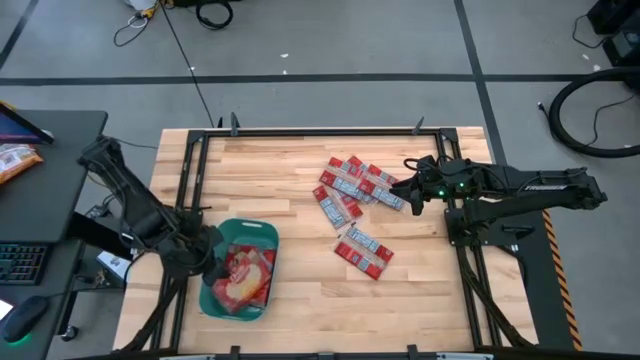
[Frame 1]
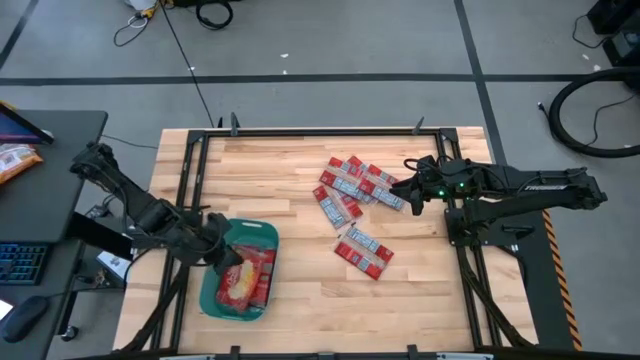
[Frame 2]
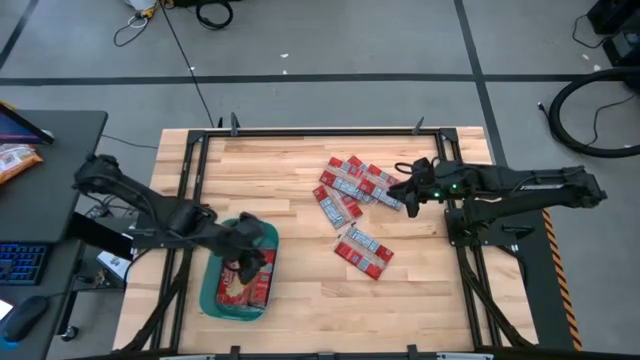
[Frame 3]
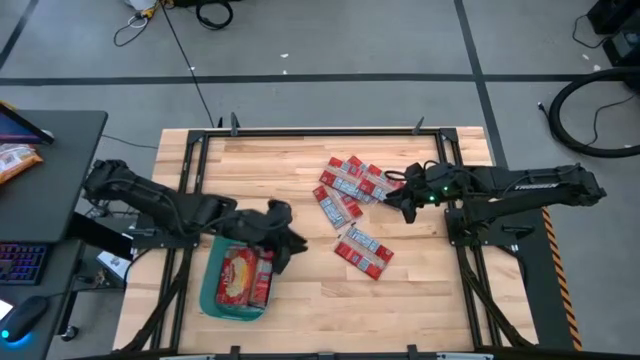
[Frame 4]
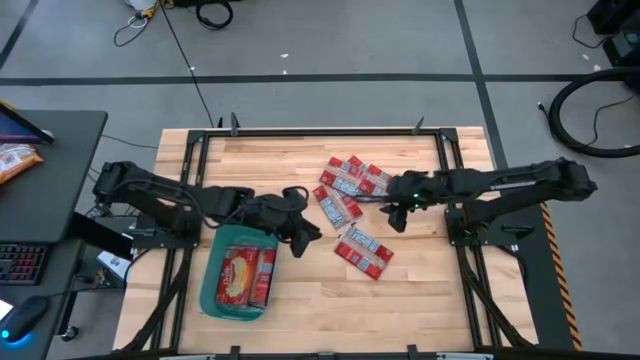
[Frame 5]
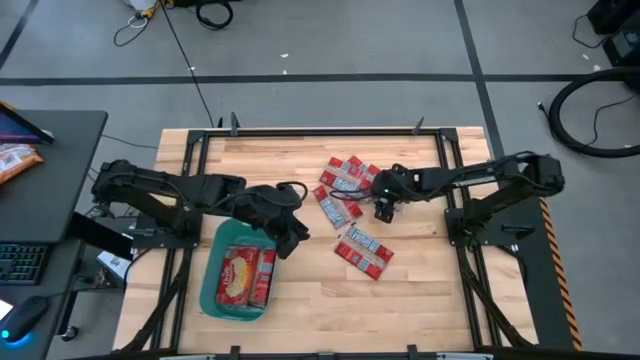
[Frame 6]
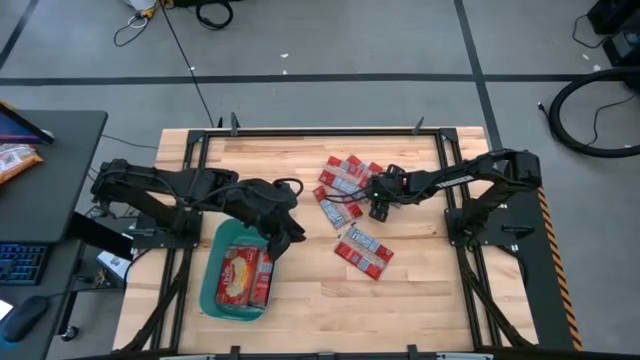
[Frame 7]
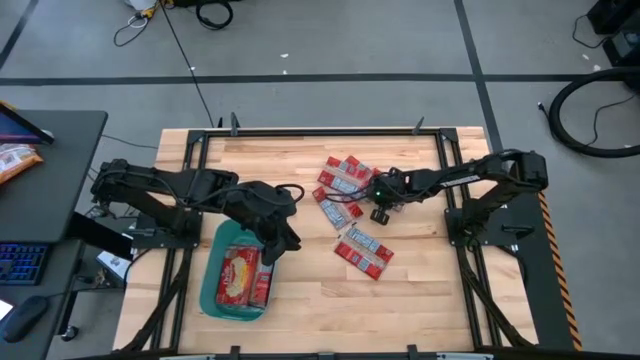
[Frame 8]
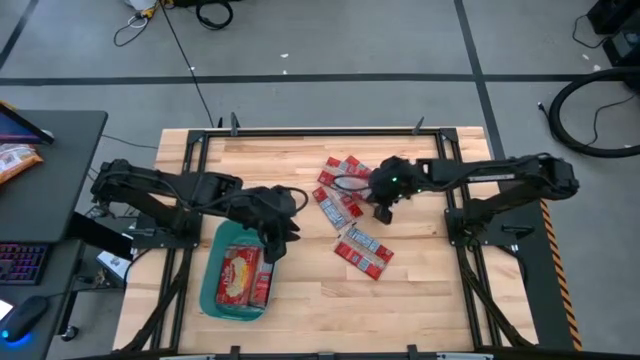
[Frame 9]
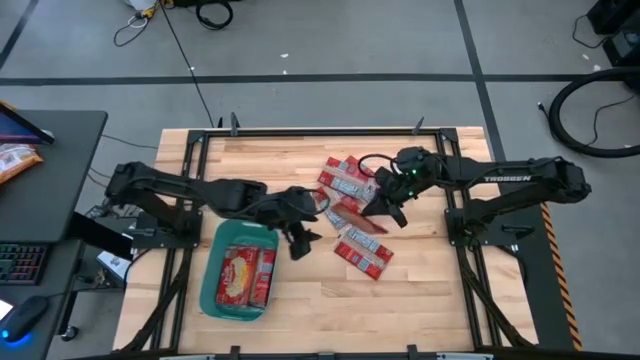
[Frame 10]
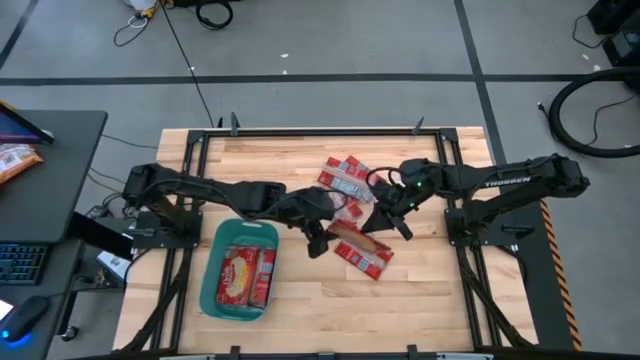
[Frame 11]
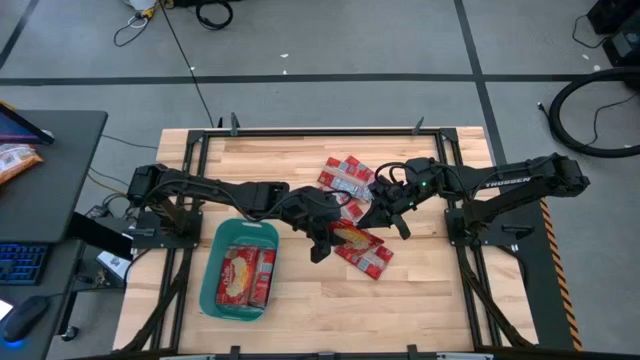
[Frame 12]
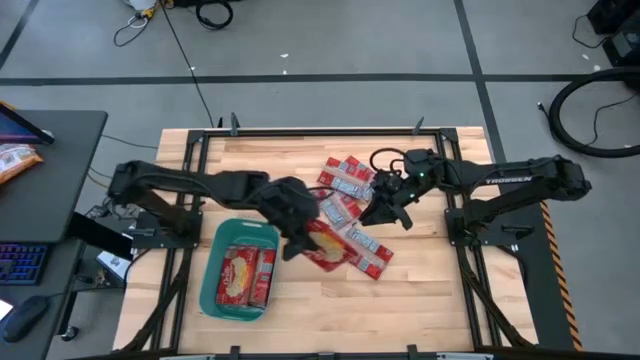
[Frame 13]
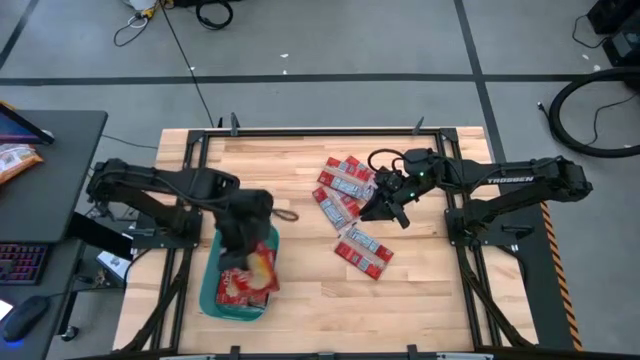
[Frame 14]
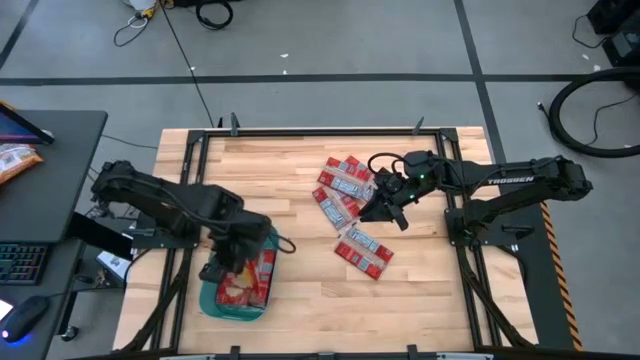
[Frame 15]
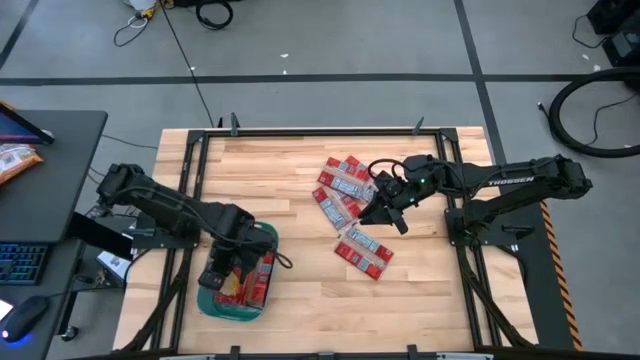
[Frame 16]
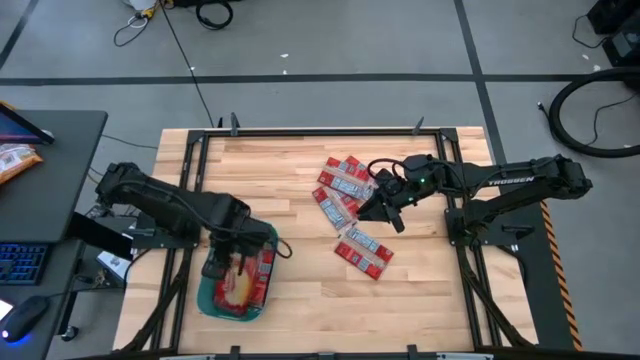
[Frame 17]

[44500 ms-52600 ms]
Task: Sort popcorn bags into baskets
Put the red popcorn bag into the green bin

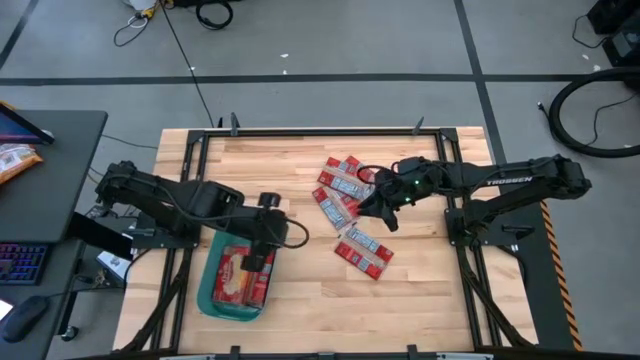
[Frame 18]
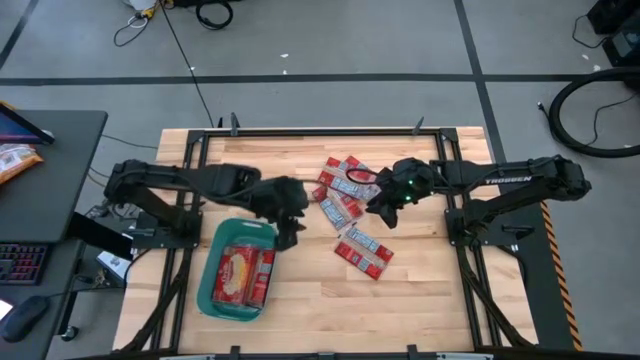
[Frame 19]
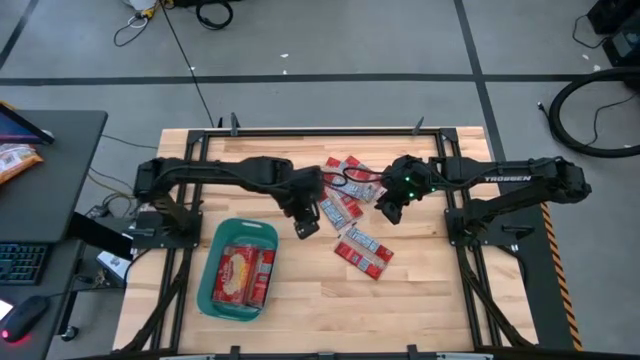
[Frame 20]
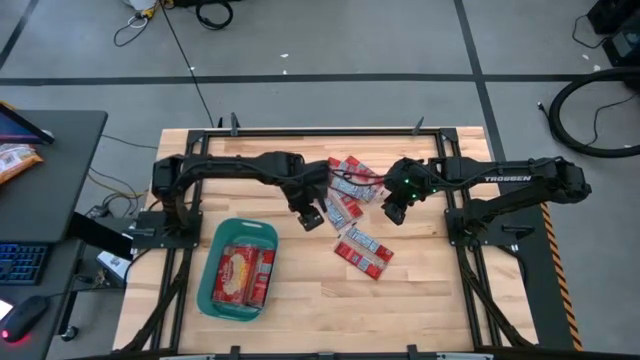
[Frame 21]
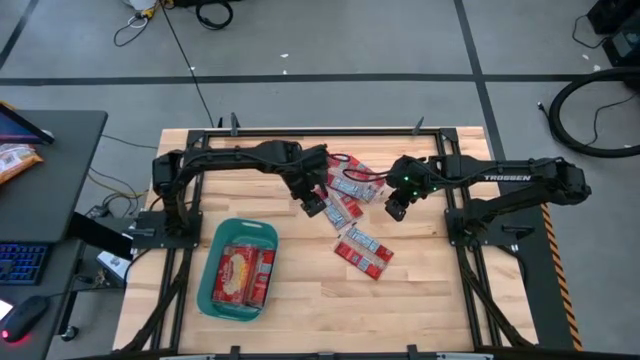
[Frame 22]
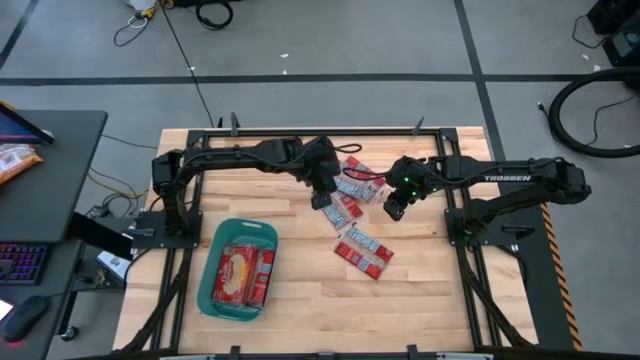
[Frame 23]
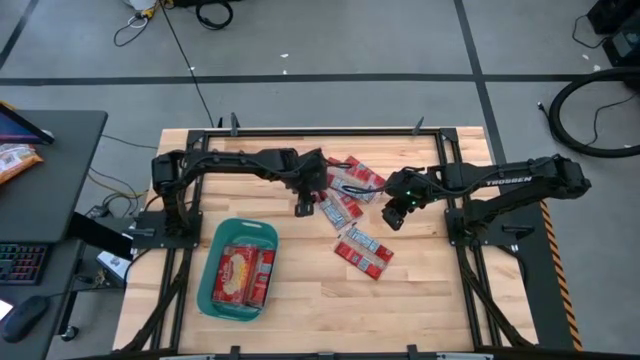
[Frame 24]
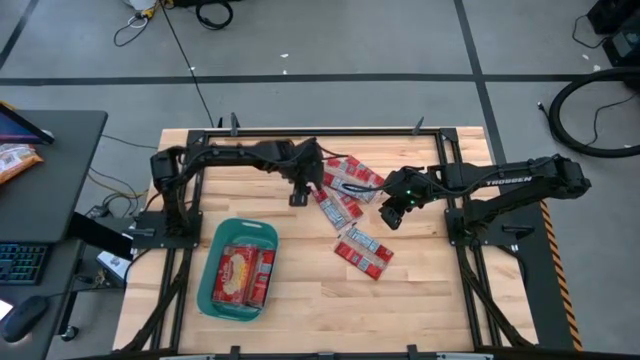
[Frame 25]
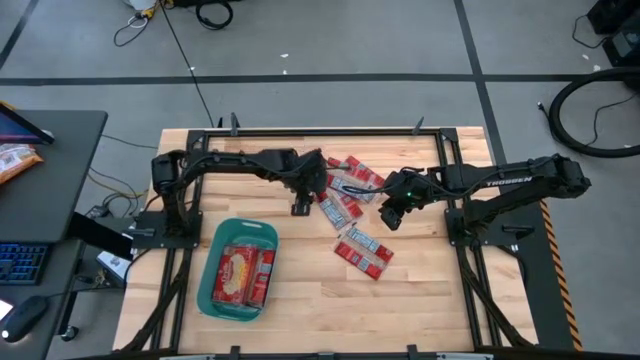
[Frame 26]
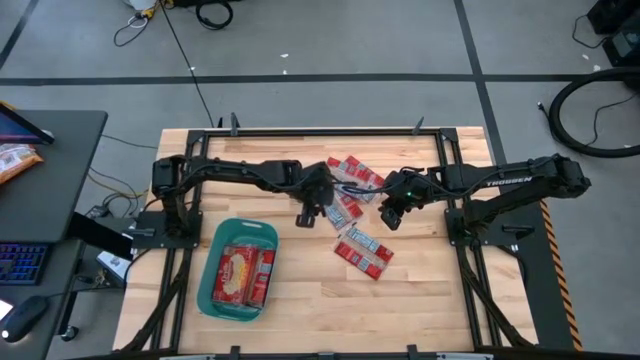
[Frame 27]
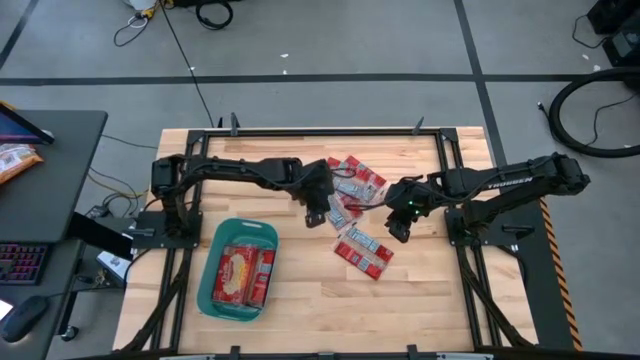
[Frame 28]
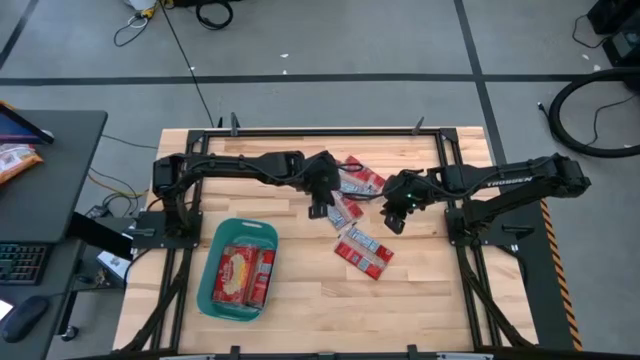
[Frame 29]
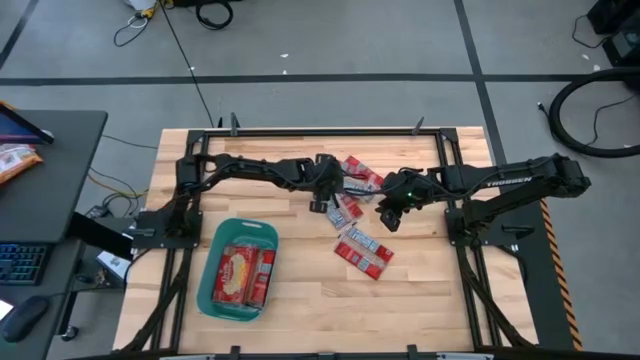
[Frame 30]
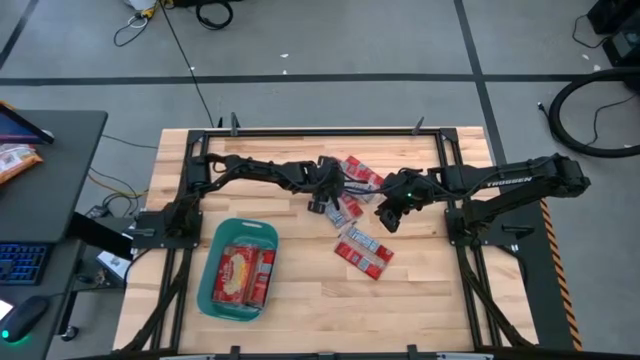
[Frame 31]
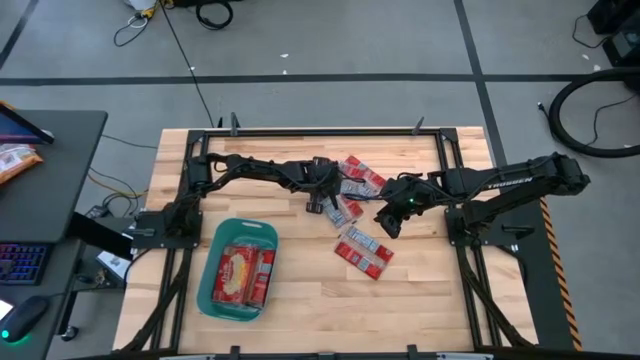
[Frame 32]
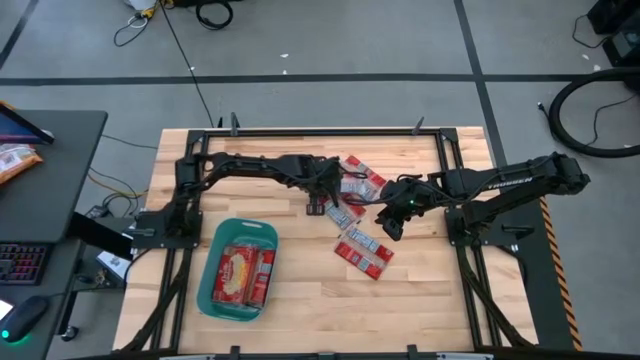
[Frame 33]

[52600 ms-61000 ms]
Put the red popcorn bag into the green bin

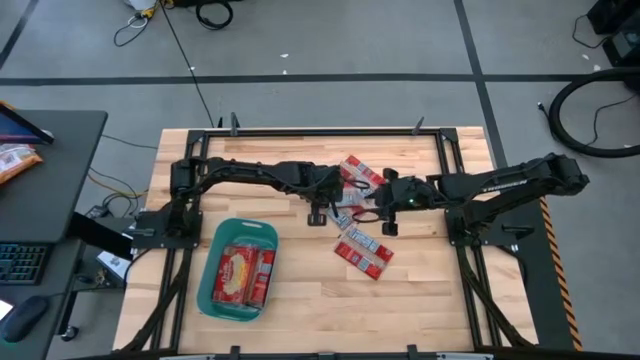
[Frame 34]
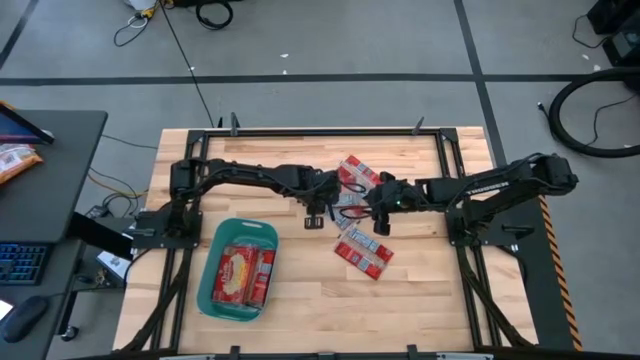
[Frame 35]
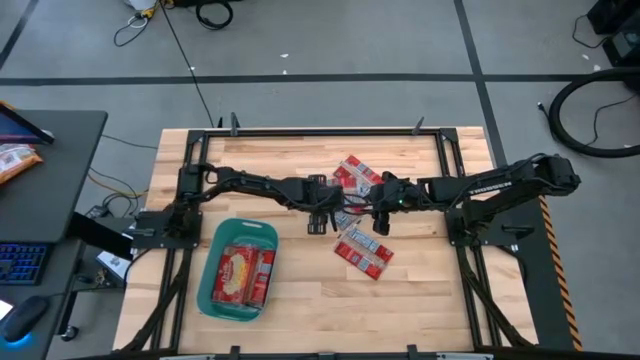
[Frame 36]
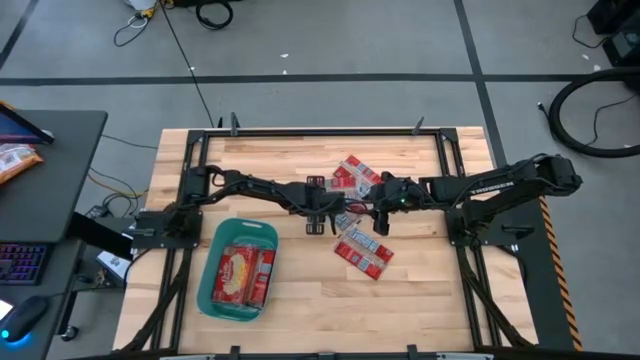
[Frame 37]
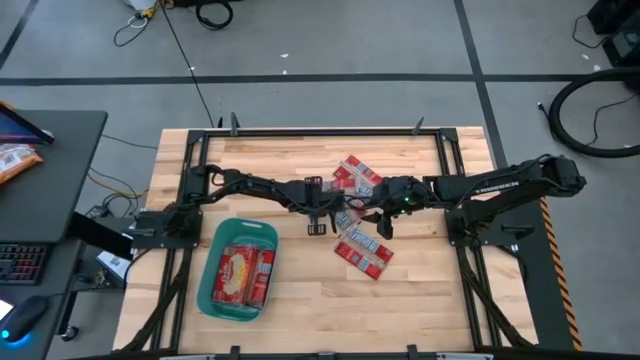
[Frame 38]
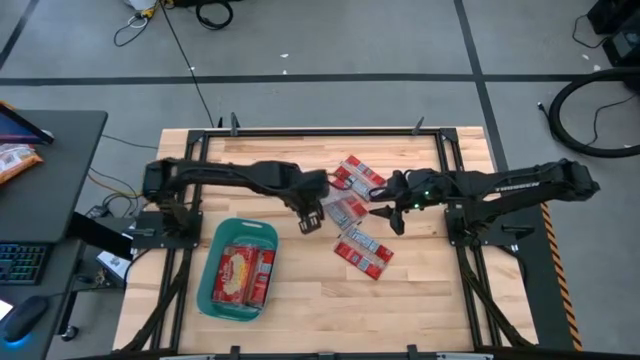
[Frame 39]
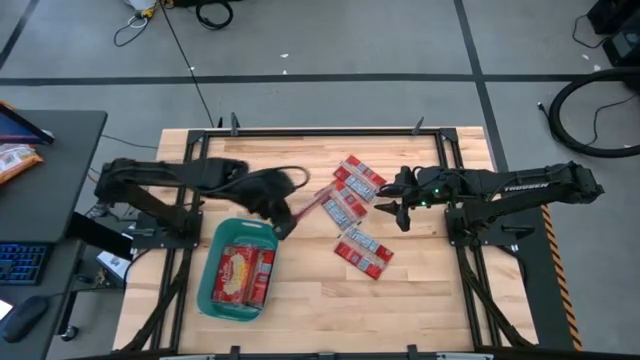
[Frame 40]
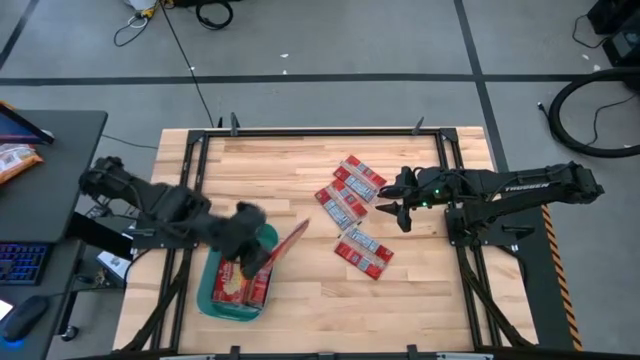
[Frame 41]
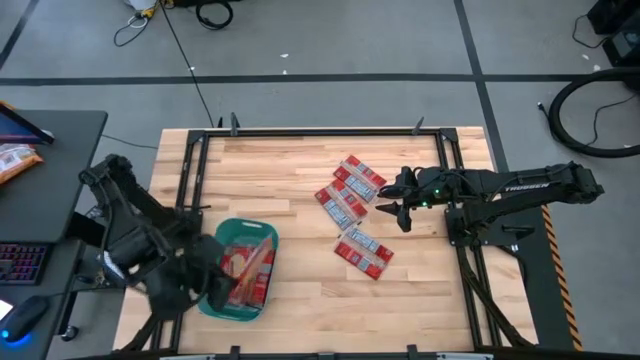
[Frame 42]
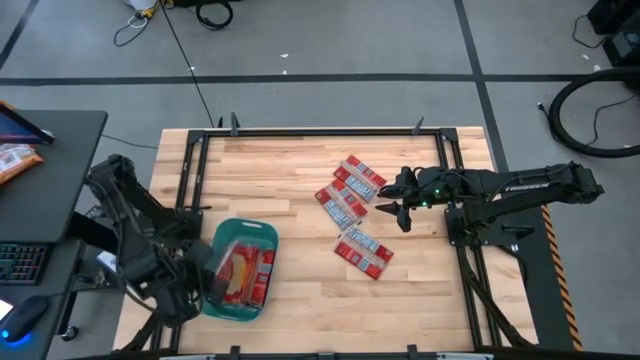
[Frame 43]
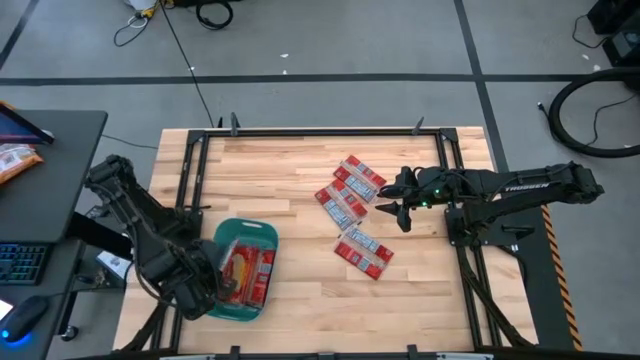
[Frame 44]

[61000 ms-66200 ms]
Put the red popcorn bag into the green bin
